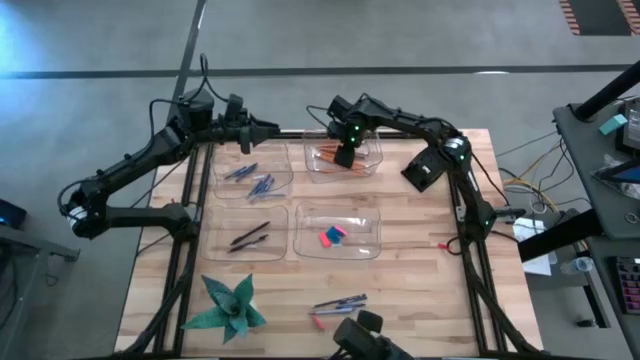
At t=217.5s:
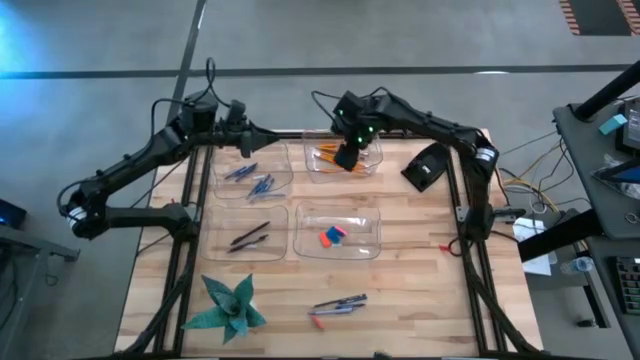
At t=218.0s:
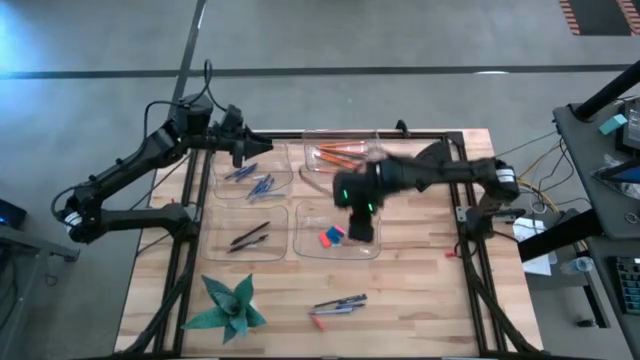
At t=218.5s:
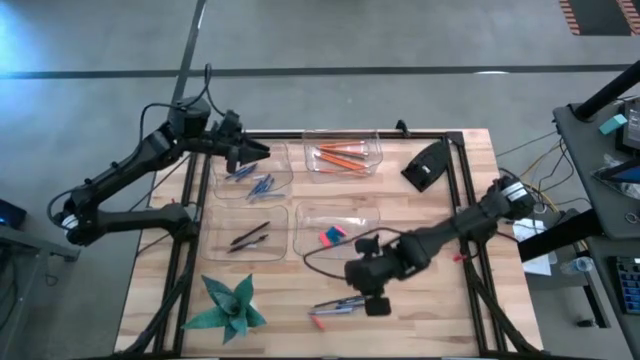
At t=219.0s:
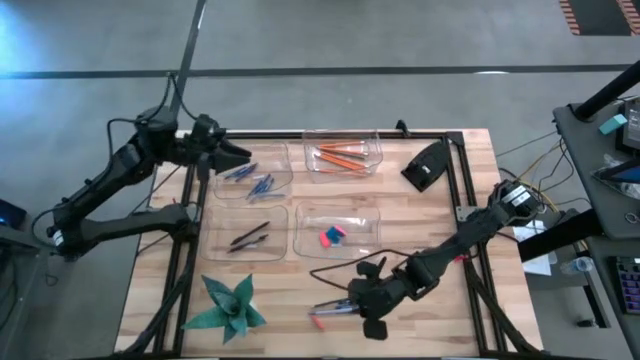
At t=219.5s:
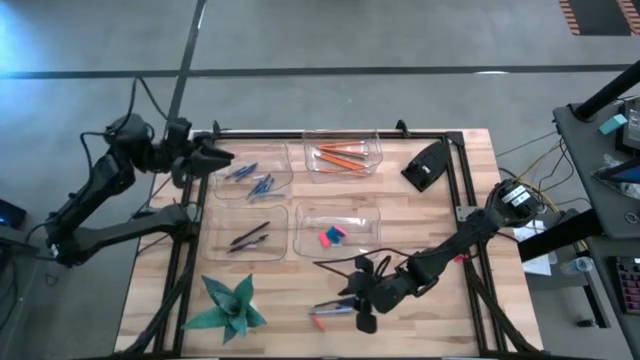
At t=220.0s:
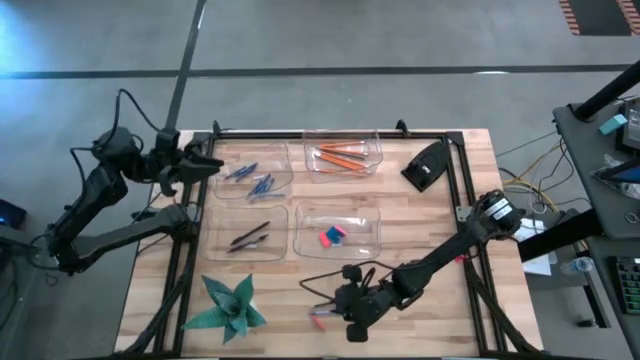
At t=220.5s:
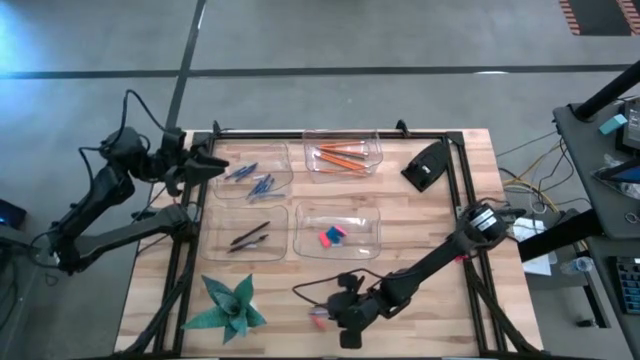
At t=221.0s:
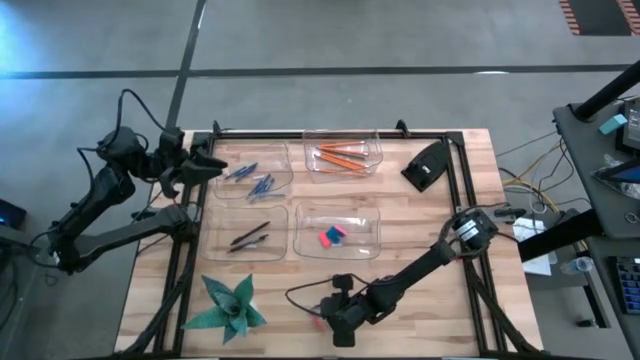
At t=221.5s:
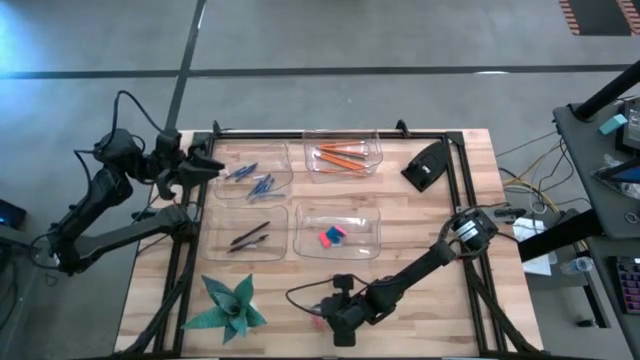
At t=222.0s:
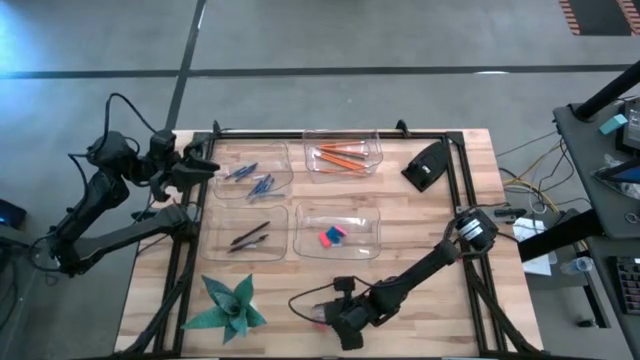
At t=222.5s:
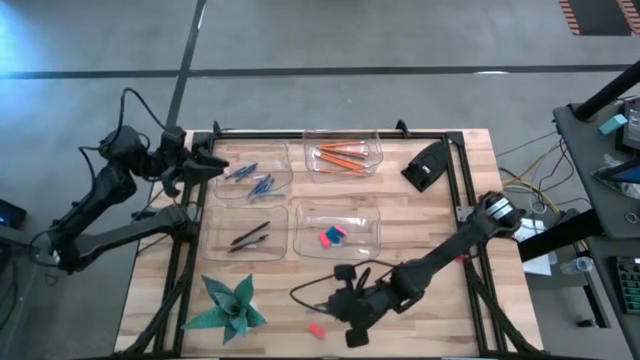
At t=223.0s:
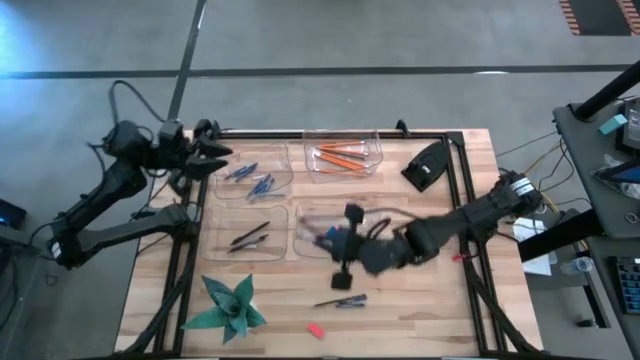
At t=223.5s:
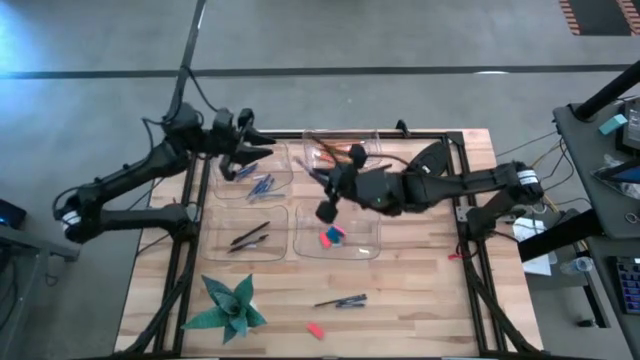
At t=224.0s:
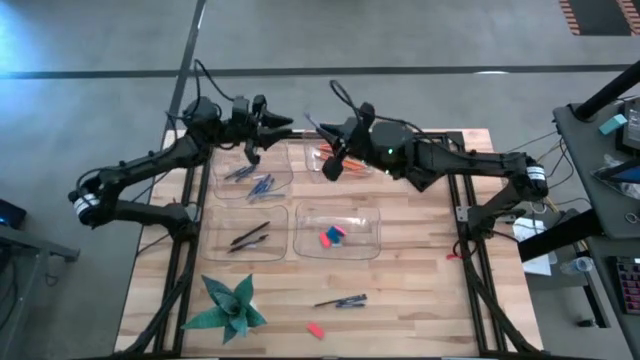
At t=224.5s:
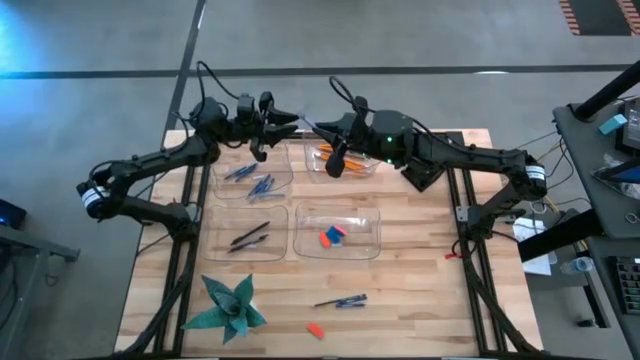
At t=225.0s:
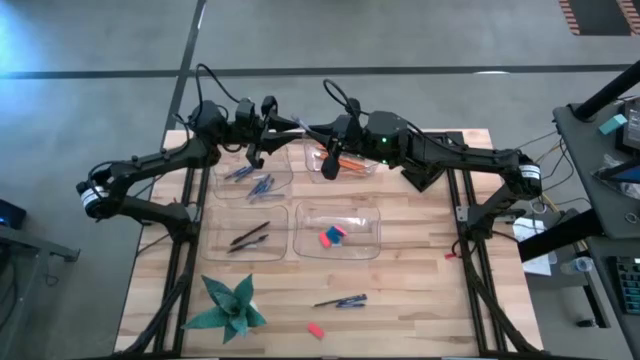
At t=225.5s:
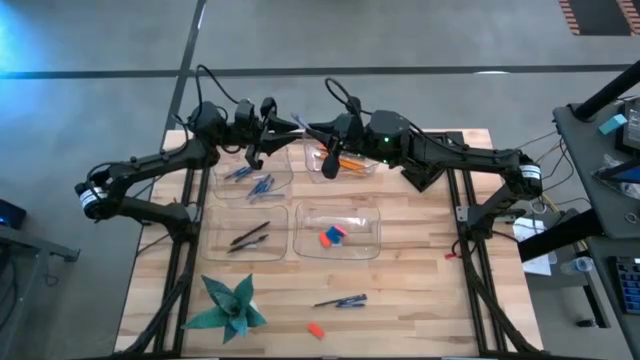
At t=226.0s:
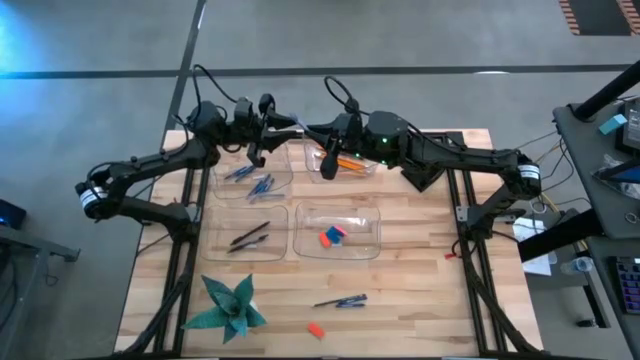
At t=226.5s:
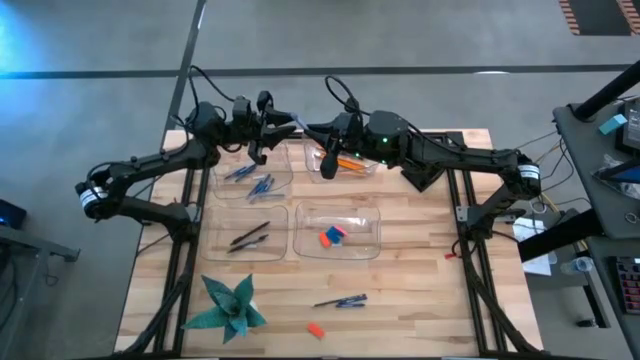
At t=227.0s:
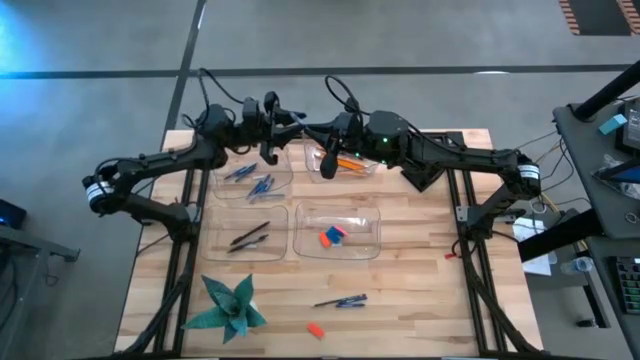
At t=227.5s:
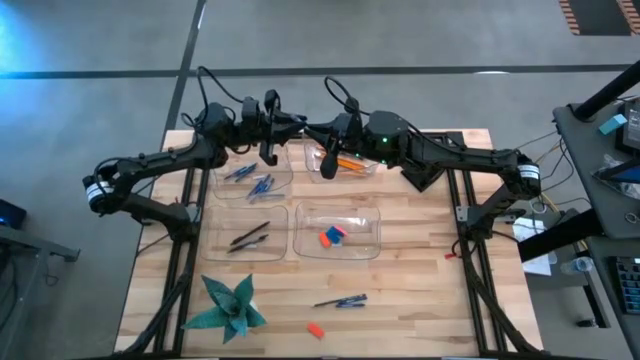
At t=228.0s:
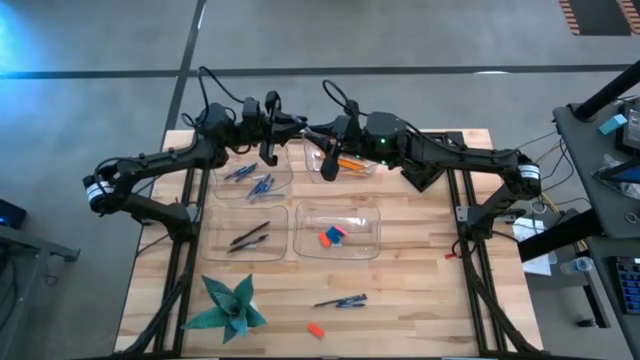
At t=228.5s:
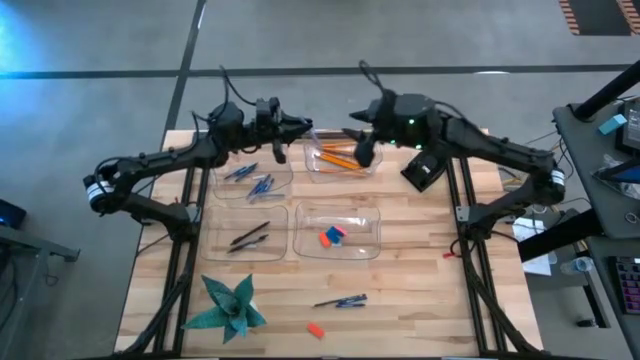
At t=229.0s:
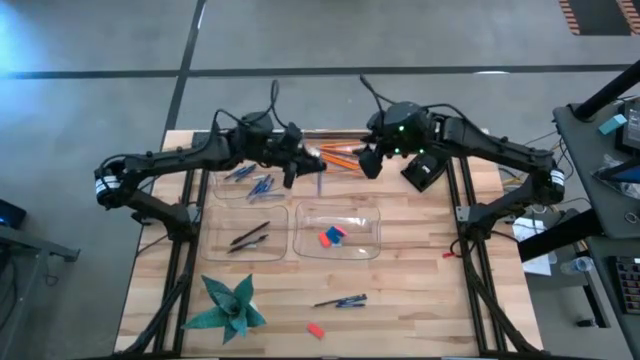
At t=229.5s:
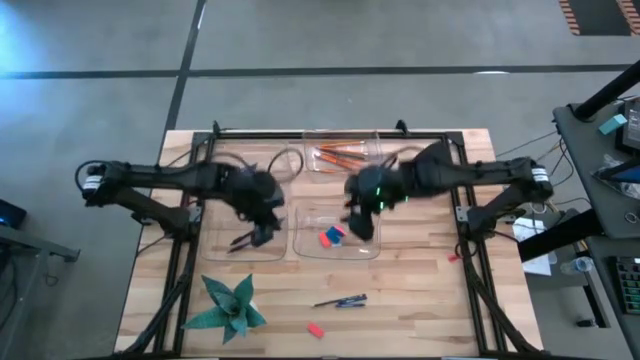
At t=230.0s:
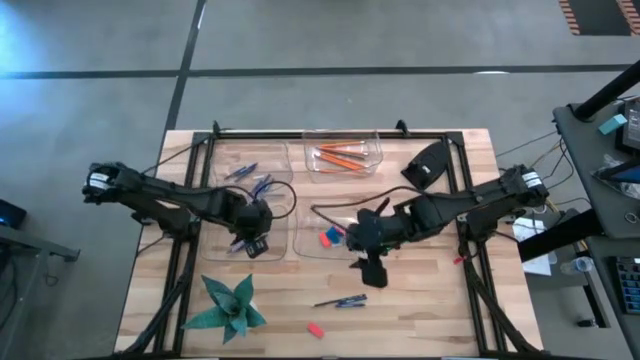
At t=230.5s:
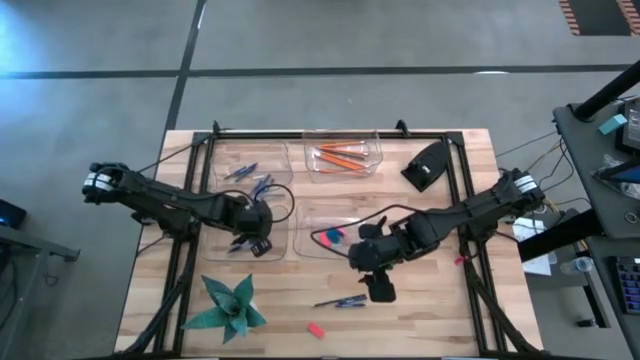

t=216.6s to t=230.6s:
Task: Sort crayons/erasers/pens/pencils in bins
Put the white pen into the bottom left transparent bin

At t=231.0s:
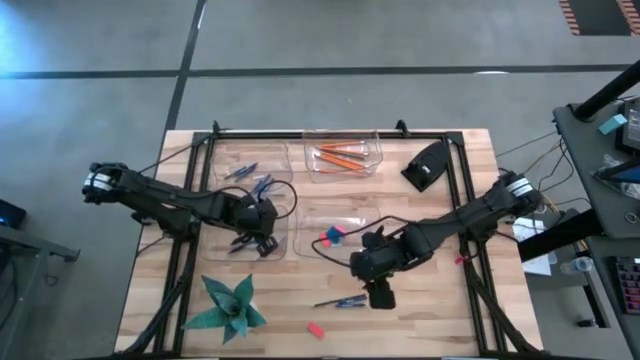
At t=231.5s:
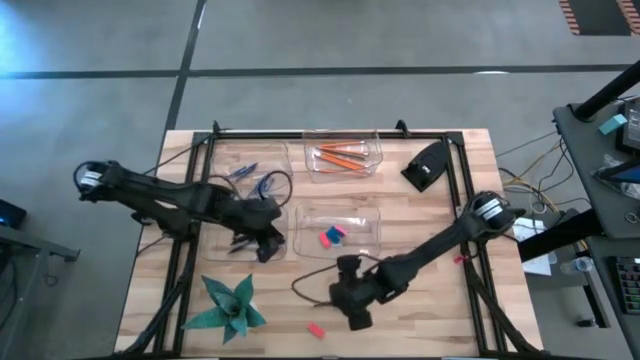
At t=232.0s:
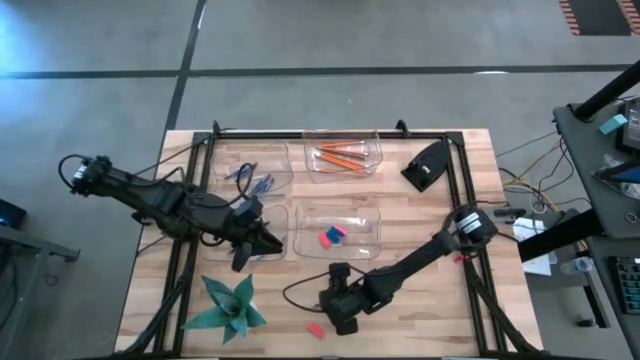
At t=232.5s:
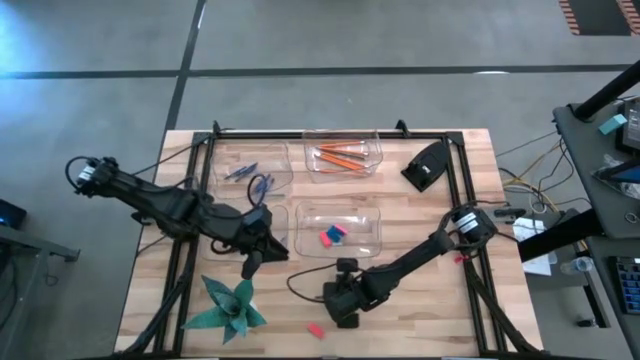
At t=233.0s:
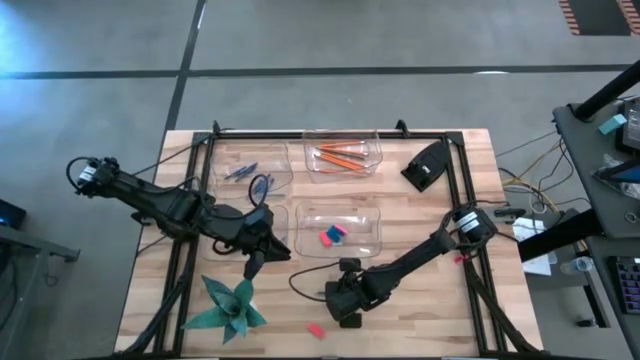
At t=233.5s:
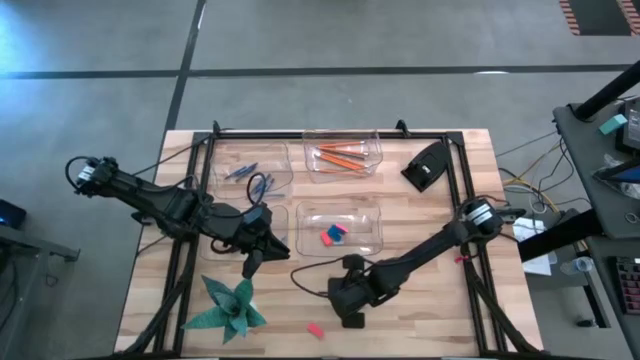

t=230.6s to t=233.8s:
Put the black pencil into the top right transparent bin

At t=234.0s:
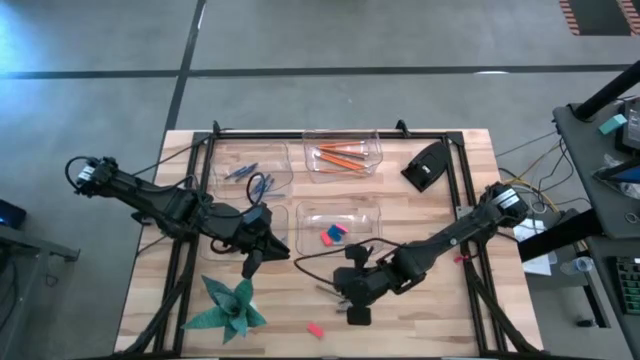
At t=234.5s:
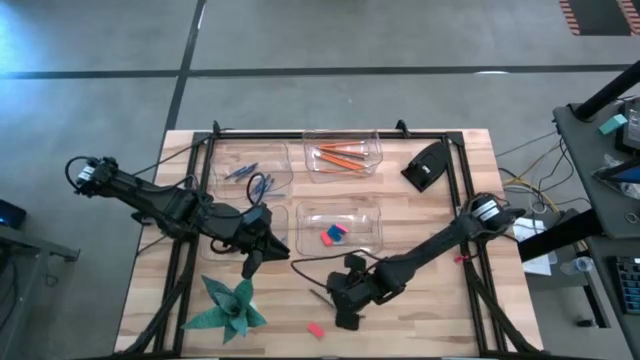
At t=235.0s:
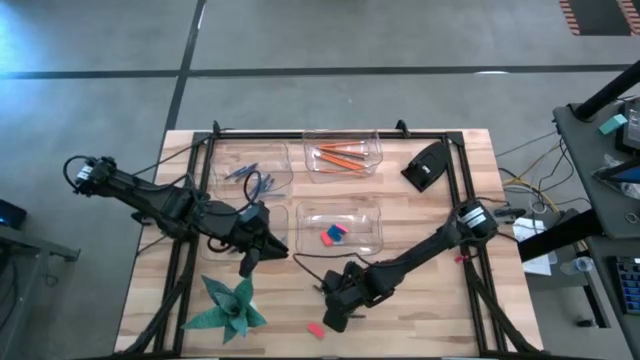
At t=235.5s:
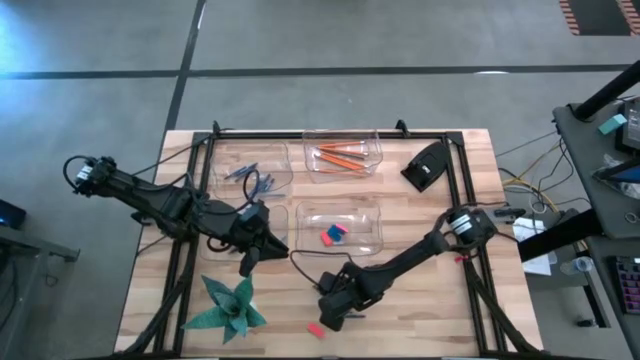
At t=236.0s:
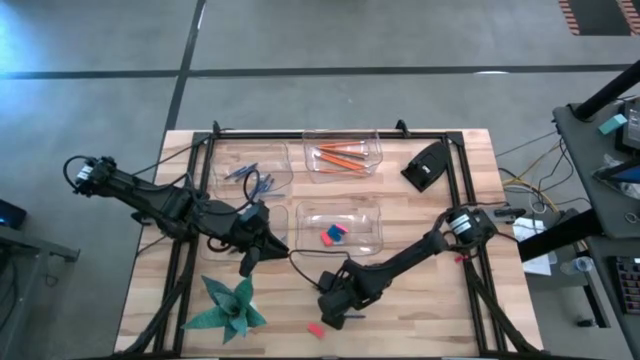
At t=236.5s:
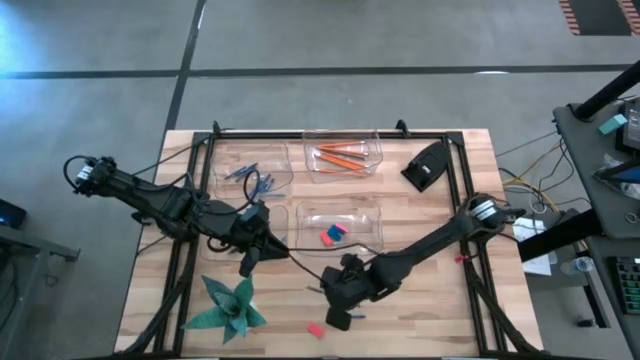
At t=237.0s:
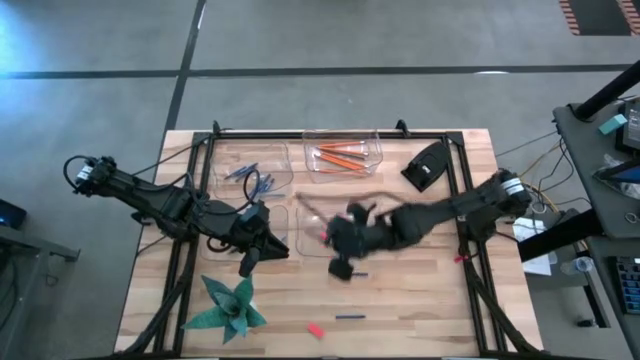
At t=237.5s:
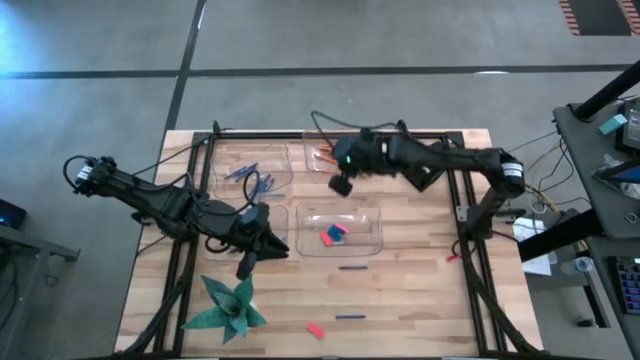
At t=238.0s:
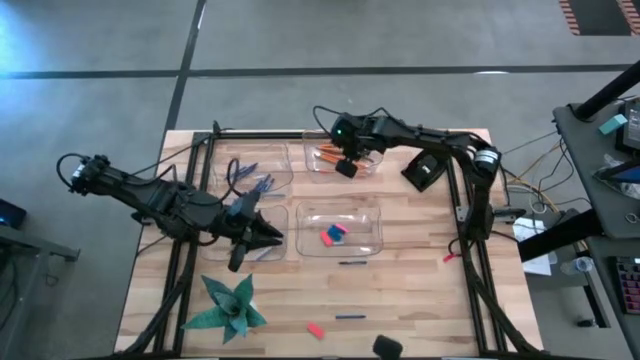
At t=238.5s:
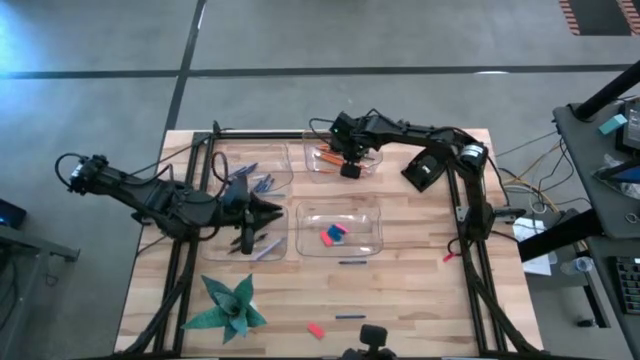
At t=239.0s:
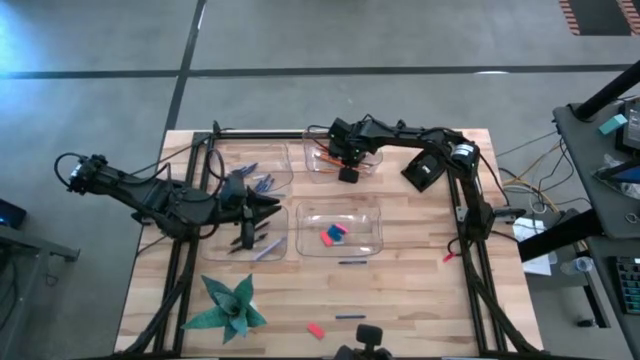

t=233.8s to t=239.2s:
Put the black pencil into the top right transparent bin
